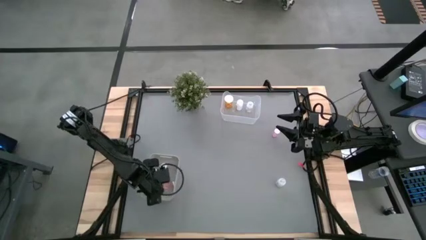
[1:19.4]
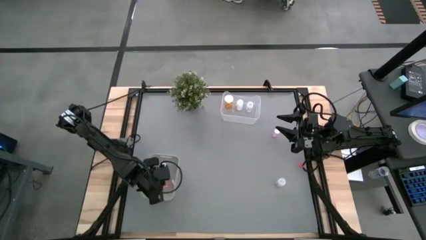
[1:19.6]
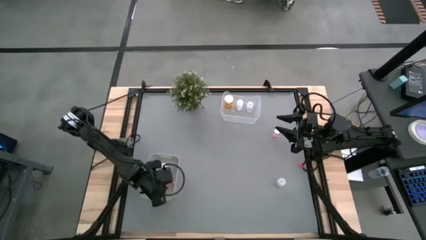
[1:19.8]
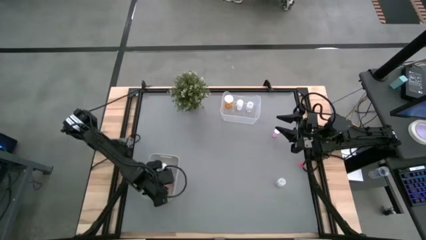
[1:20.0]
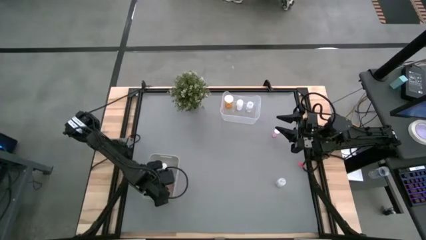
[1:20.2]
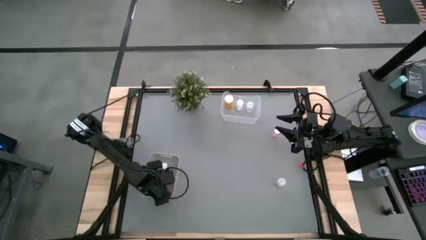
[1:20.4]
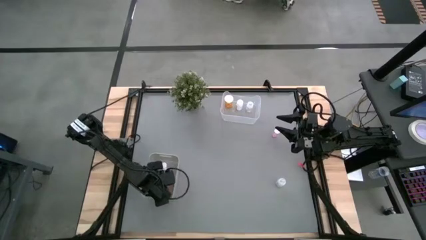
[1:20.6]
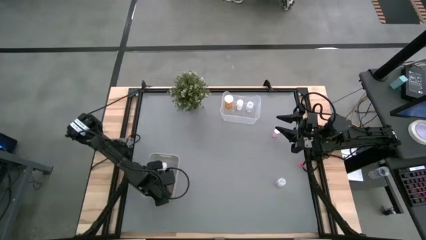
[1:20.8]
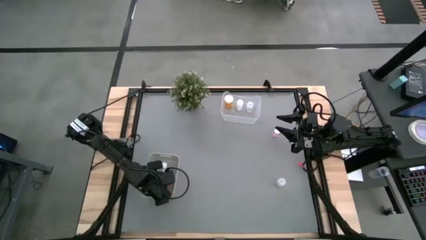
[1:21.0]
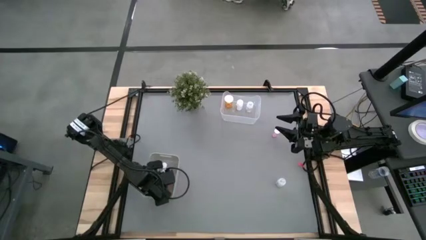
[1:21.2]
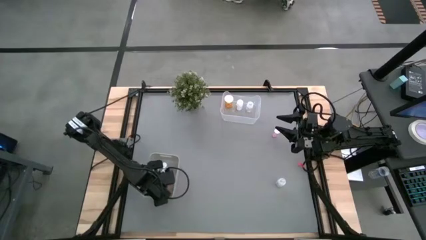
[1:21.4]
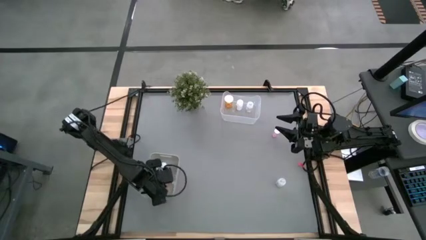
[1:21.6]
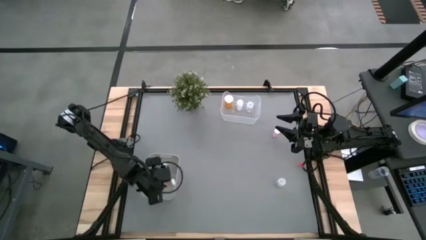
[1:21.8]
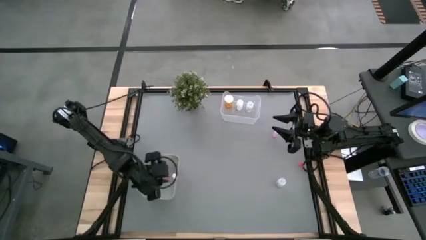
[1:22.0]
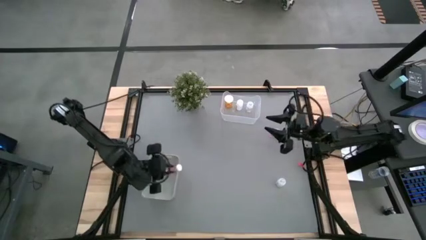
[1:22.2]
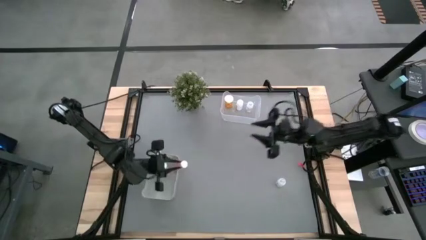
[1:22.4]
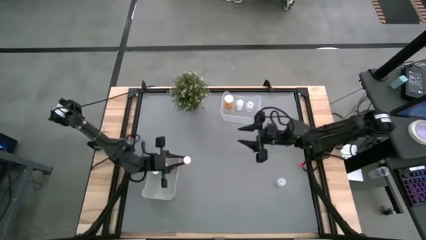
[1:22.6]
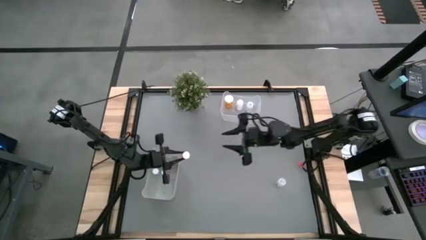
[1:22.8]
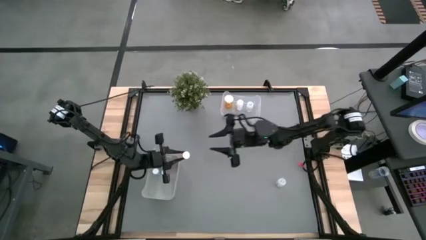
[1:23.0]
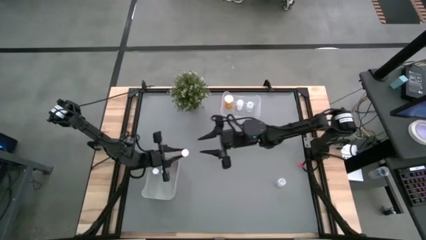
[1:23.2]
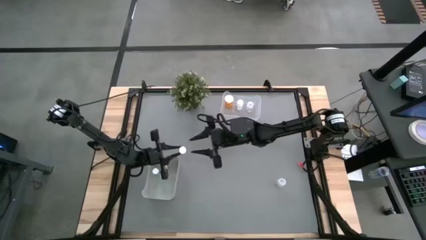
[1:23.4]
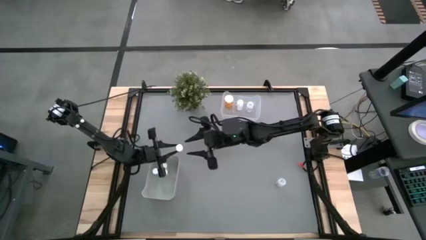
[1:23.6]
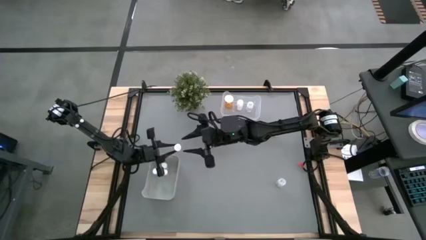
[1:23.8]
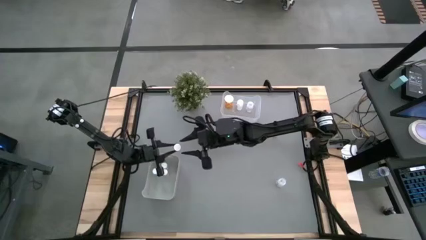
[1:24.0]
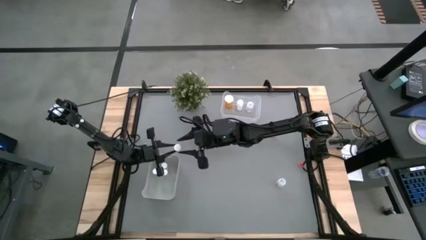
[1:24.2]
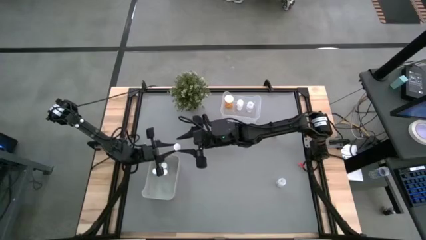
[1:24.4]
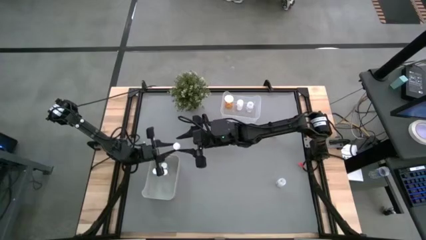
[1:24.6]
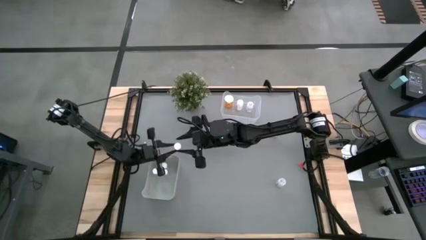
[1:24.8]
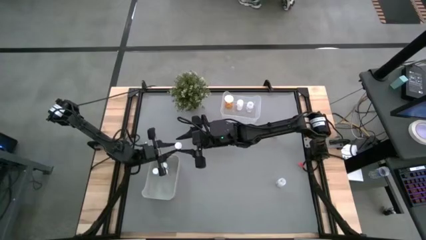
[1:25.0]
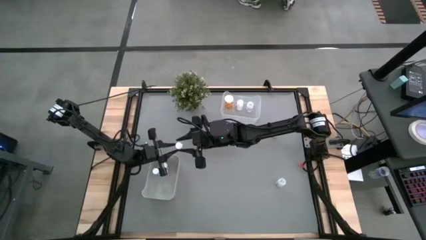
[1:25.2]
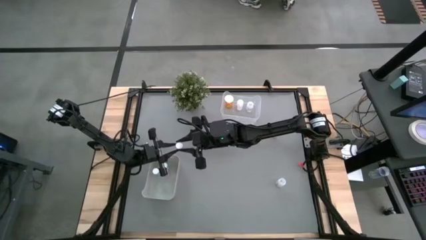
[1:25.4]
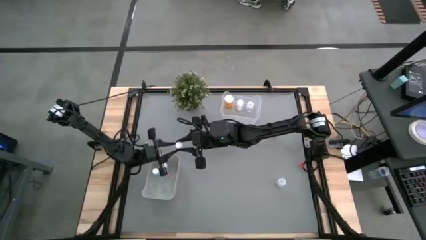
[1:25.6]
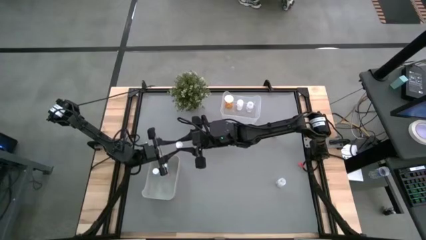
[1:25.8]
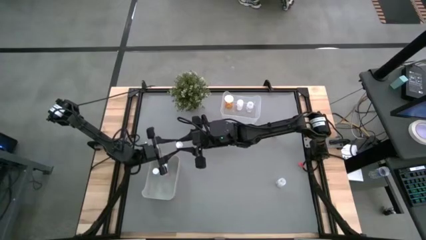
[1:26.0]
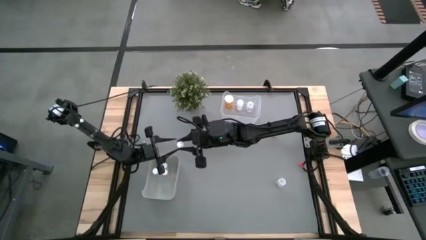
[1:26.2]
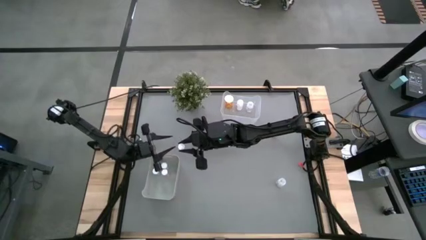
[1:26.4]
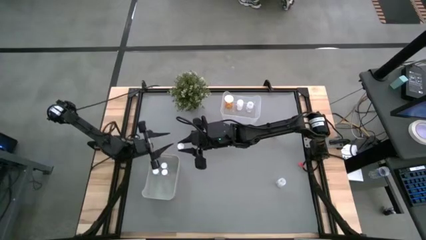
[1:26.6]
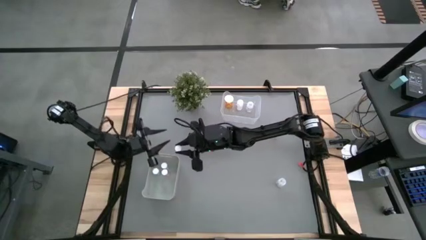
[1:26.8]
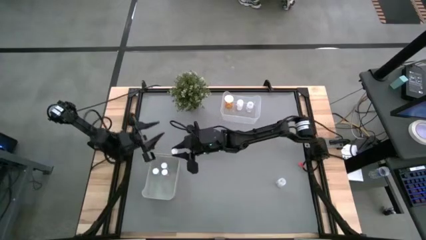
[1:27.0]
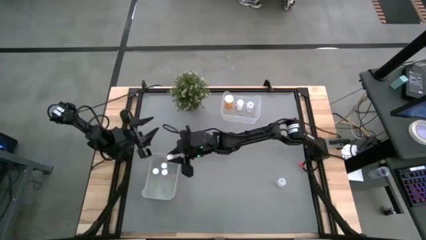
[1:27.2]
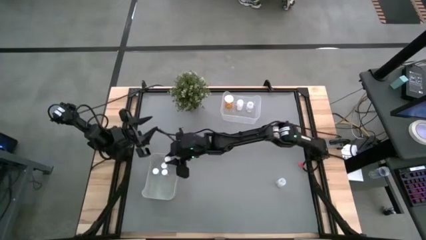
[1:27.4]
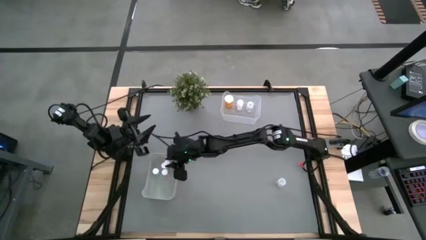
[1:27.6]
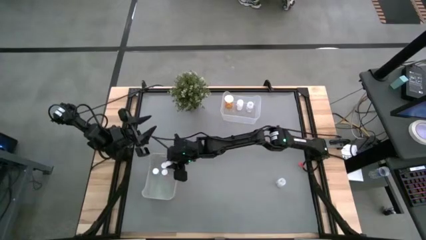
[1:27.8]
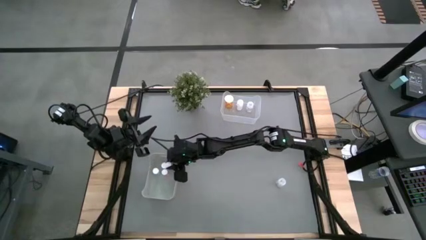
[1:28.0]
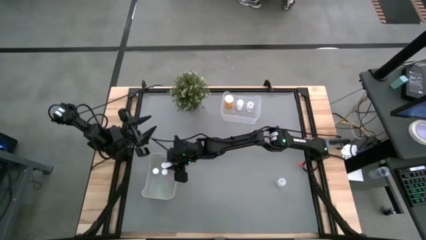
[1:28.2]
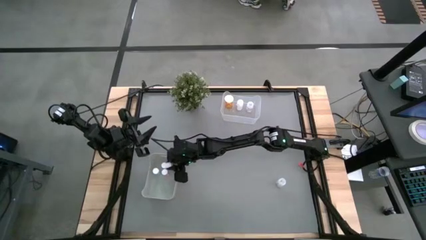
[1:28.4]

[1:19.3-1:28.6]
Task: Pick and place medicine bottles into bin by pill shape (circle, oval)
Put the pink tablet bottle into the gray bin
